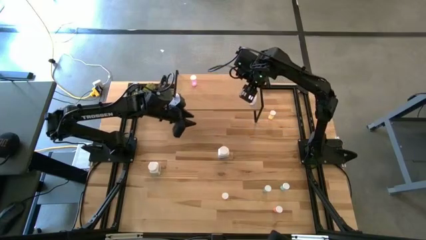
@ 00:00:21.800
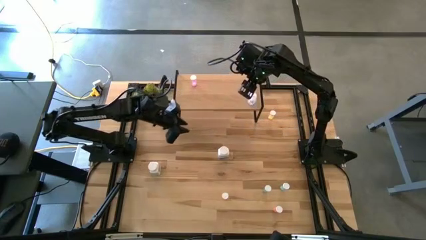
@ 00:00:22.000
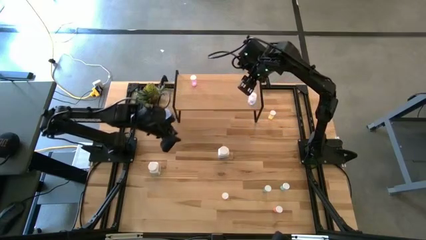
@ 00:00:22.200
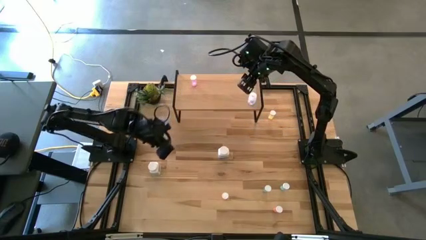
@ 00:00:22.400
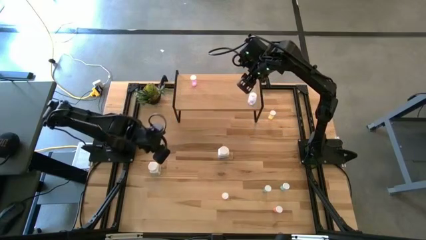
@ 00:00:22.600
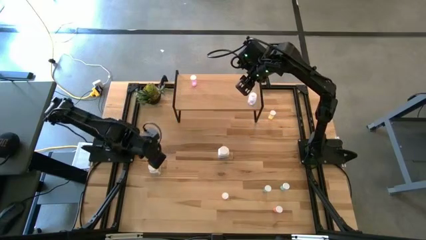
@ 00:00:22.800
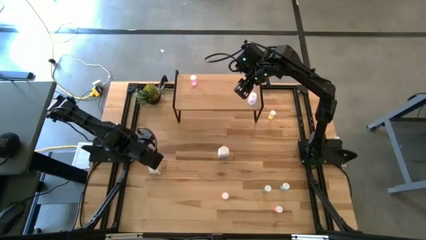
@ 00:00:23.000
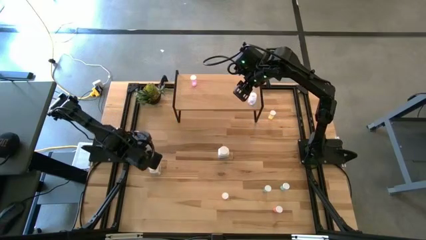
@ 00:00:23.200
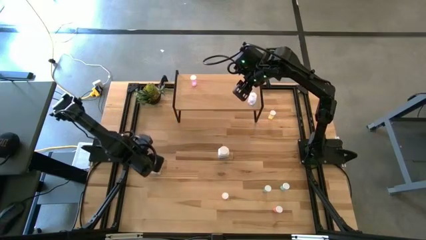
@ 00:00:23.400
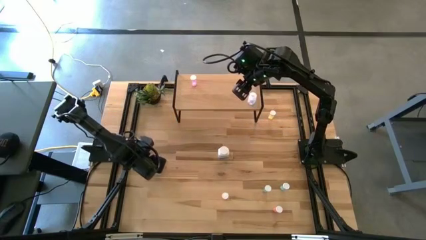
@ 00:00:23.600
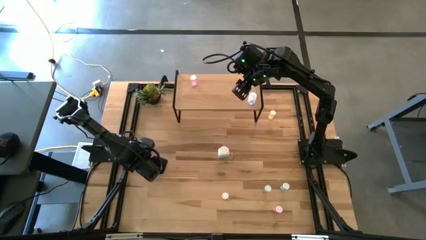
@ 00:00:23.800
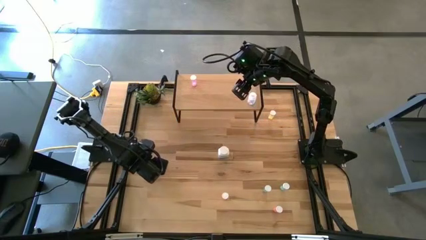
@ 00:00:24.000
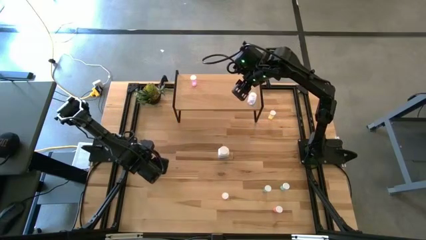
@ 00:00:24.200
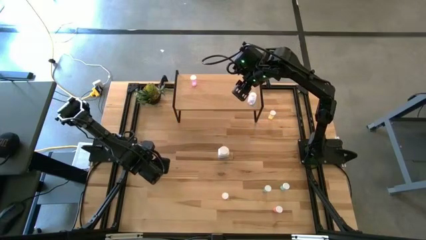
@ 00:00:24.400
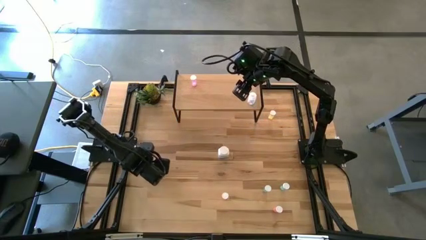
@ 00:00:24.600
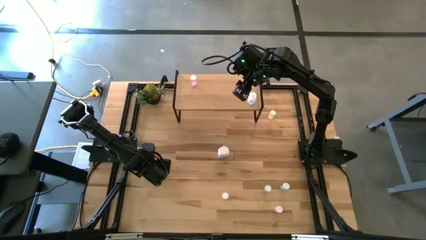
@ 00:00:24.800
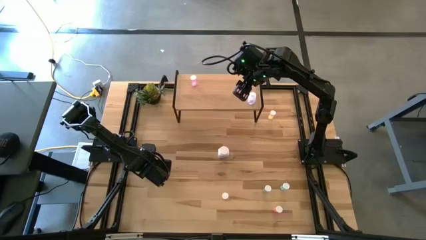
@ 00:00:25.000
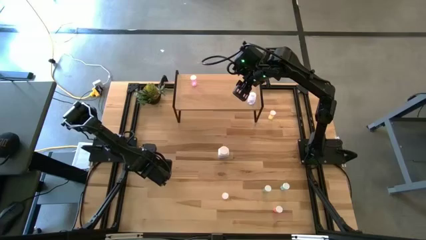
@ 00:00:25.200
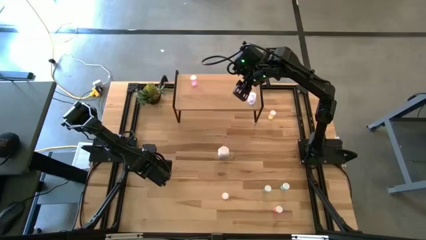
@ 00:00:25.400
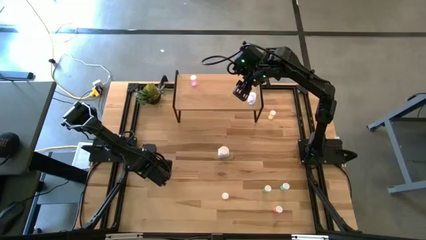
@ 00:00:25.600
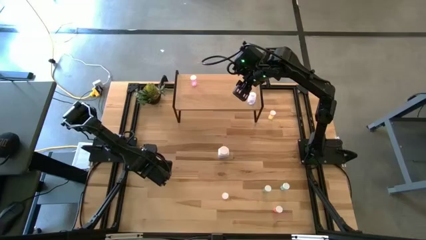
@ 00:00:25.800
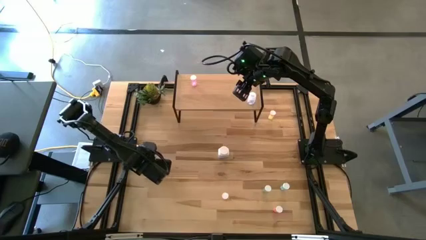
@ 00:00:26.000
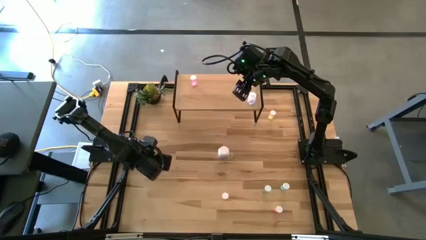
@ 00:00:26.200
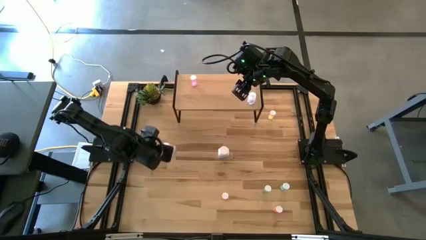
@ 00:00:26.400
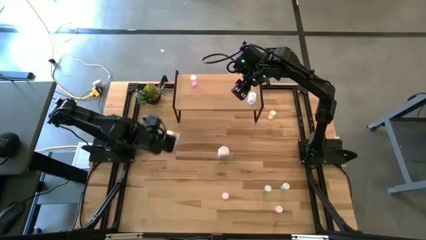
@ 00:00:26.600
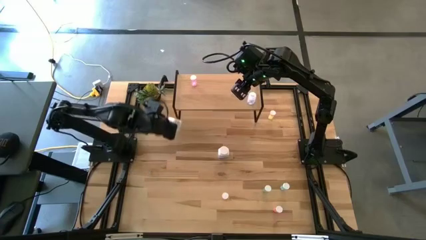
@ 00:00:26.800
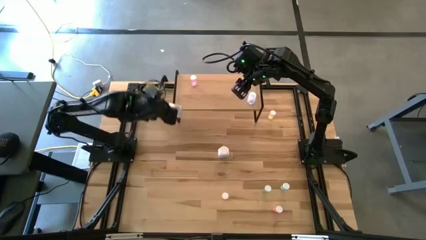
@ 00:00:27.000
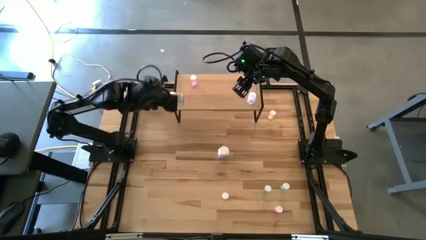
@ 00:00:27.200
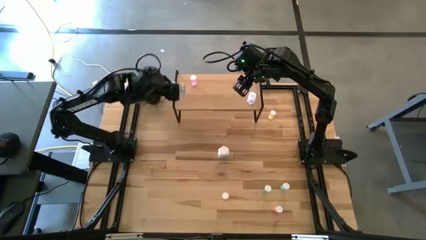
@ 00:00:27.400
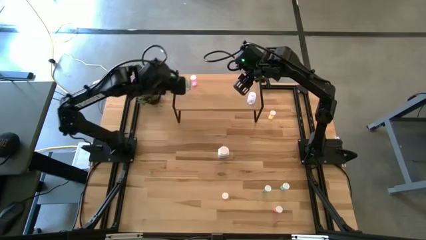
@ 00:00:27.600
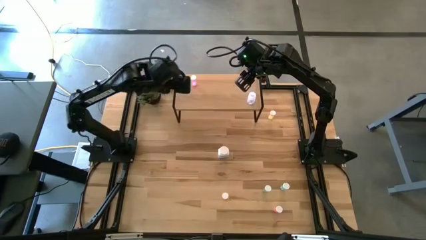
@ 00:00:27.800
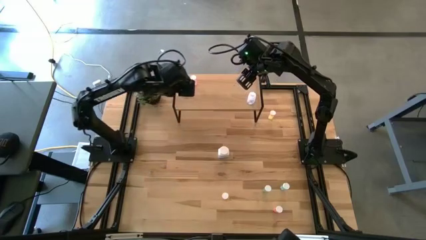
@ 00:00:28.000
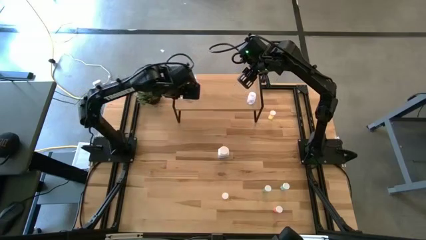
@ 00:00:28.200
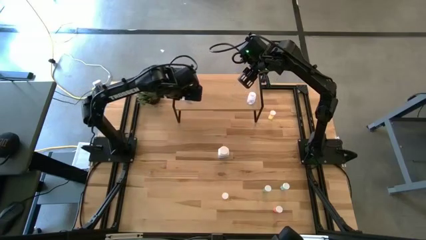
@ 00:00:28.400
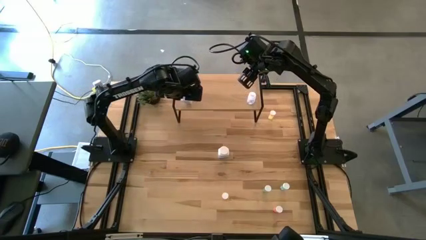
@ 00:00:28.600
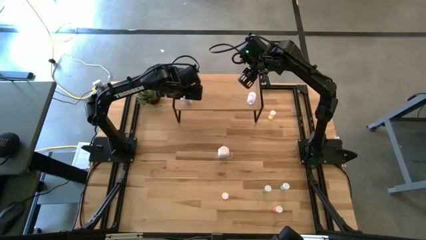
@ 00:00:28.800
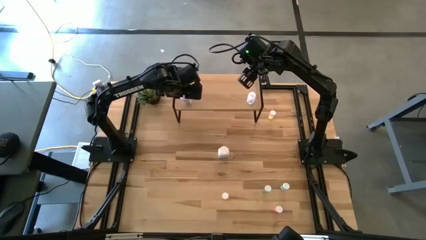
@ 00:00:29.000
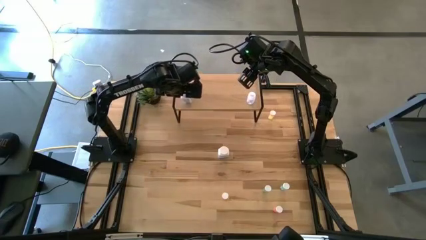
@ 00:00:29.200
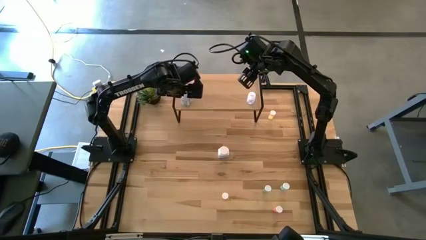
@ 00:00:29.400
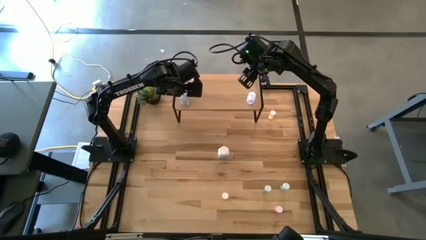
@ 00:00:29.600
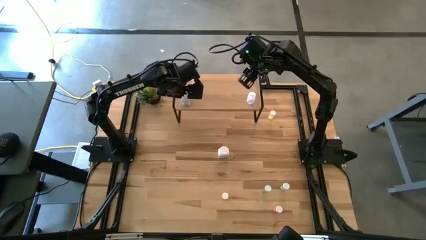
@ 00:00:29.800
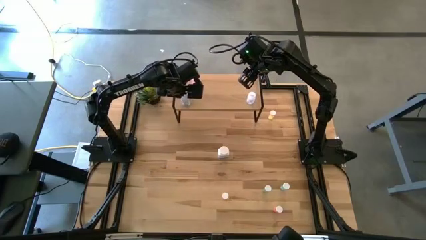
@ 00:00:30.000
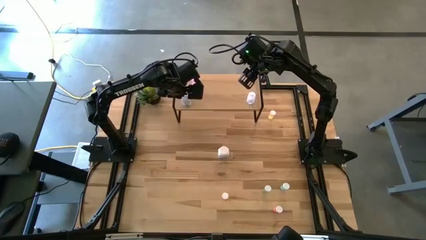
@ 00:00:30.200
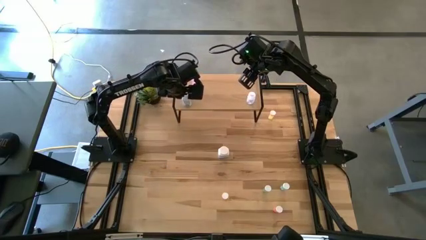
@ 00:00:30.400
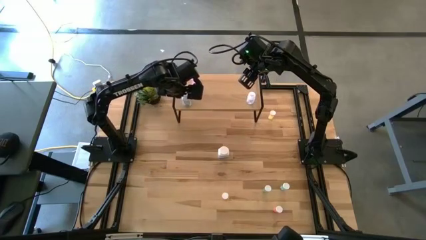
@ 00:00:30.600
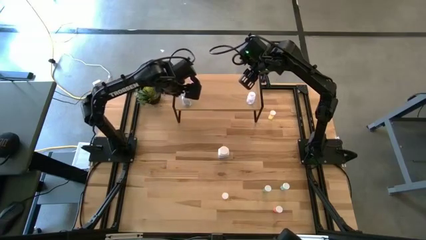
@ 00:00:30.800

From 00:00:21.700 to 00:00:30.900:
Task: Pick and place medicine bottles onto shelf by color
Put the left blue pill bottle on the shelf

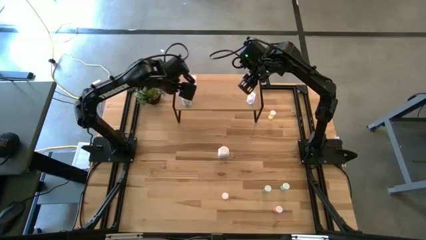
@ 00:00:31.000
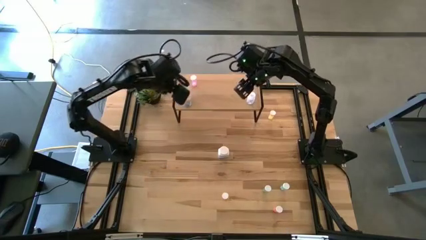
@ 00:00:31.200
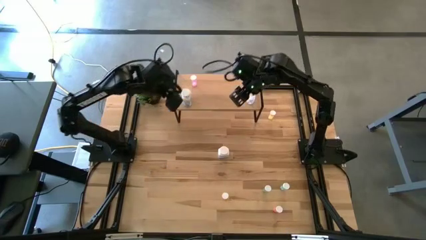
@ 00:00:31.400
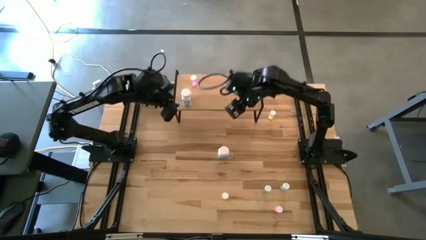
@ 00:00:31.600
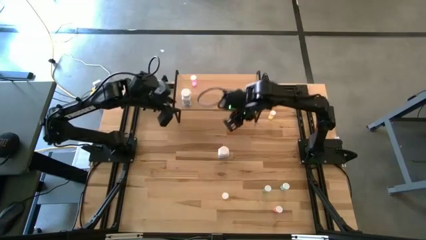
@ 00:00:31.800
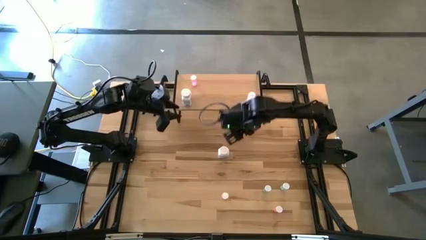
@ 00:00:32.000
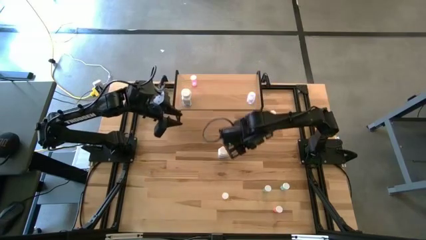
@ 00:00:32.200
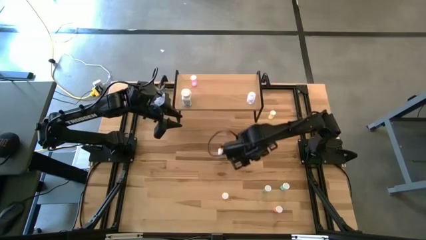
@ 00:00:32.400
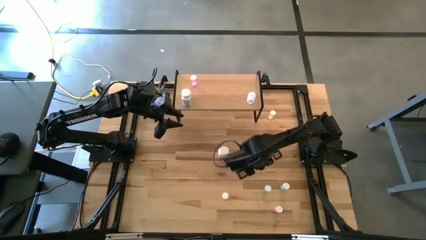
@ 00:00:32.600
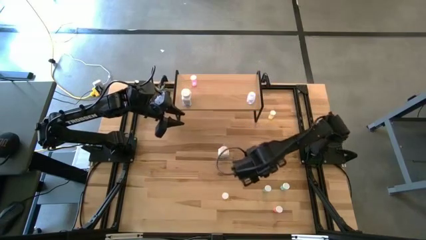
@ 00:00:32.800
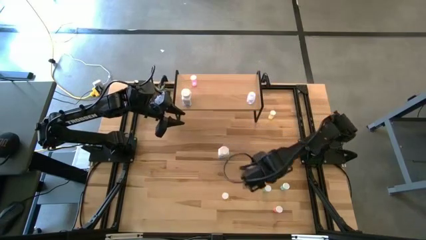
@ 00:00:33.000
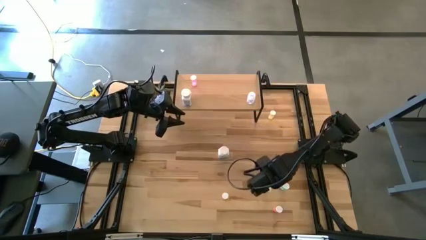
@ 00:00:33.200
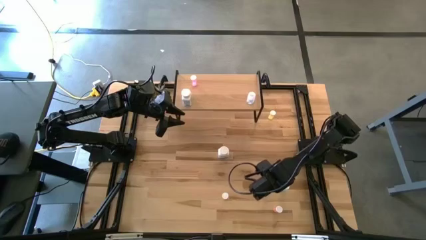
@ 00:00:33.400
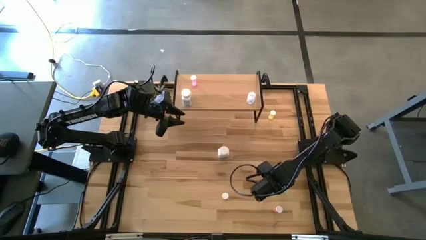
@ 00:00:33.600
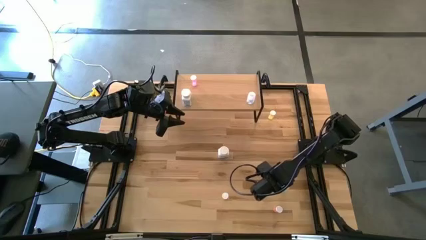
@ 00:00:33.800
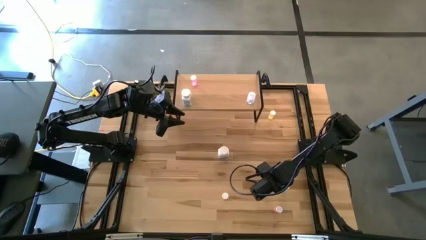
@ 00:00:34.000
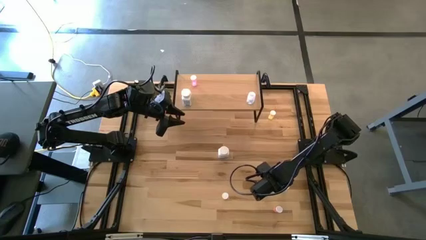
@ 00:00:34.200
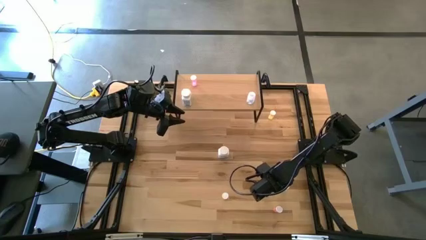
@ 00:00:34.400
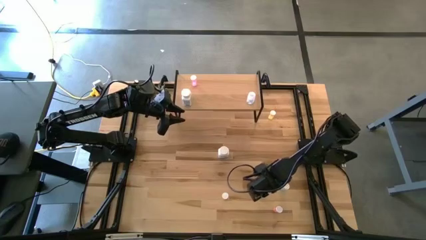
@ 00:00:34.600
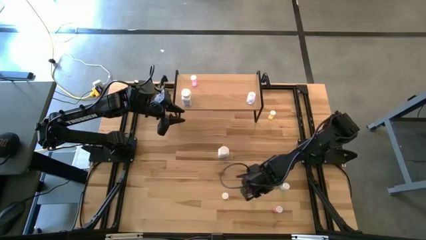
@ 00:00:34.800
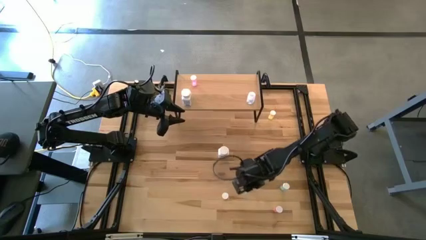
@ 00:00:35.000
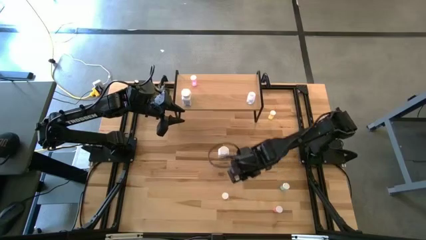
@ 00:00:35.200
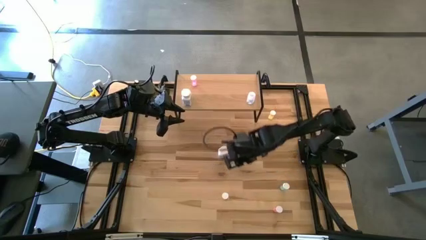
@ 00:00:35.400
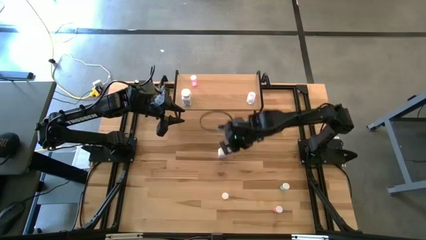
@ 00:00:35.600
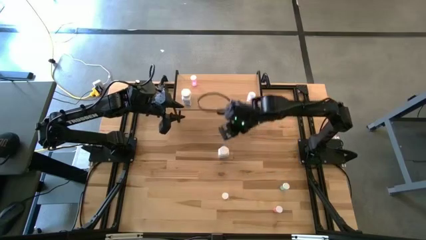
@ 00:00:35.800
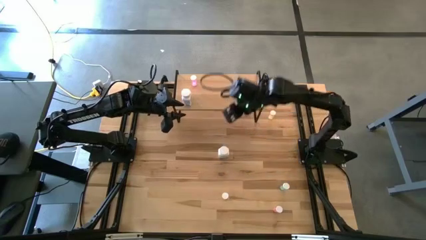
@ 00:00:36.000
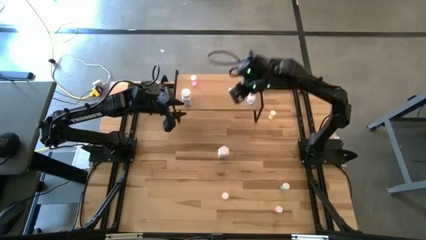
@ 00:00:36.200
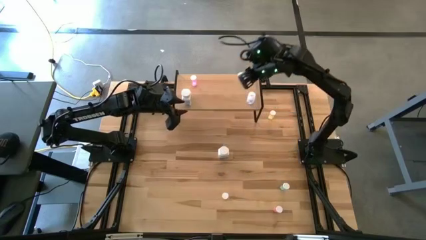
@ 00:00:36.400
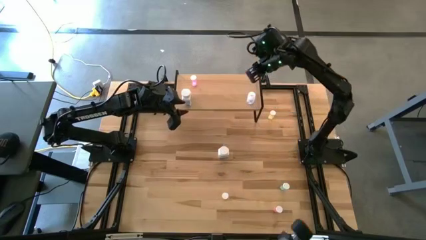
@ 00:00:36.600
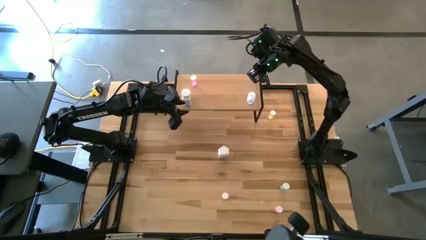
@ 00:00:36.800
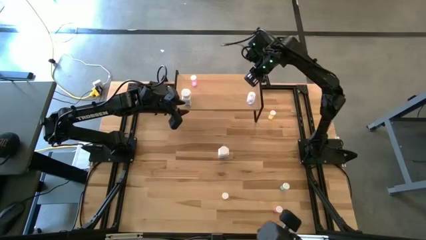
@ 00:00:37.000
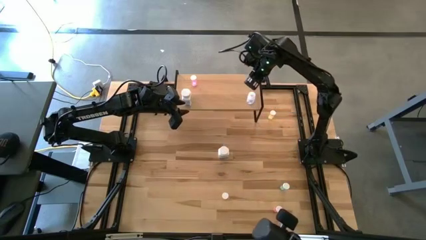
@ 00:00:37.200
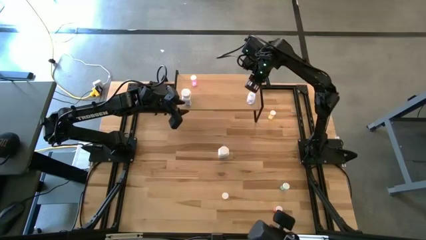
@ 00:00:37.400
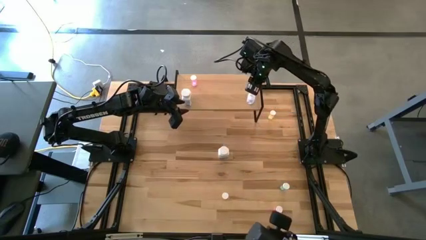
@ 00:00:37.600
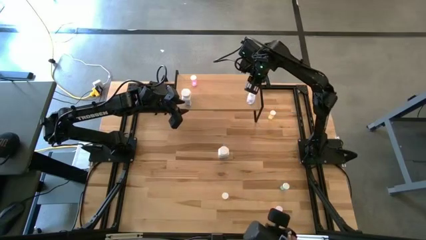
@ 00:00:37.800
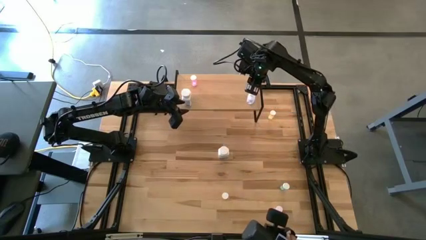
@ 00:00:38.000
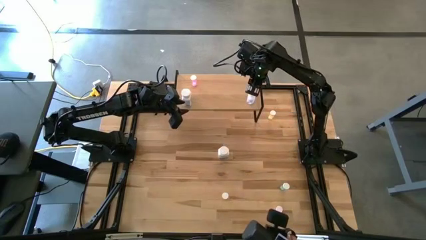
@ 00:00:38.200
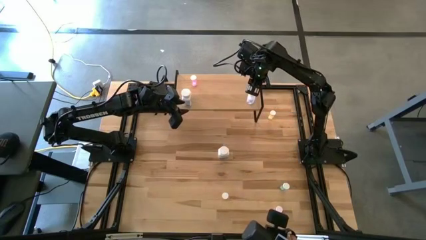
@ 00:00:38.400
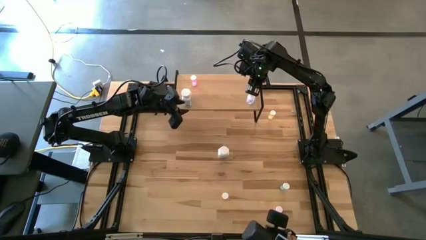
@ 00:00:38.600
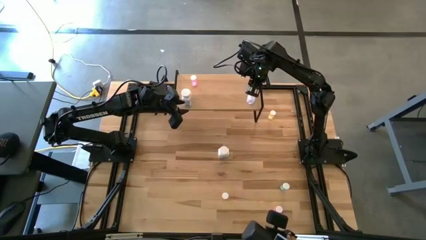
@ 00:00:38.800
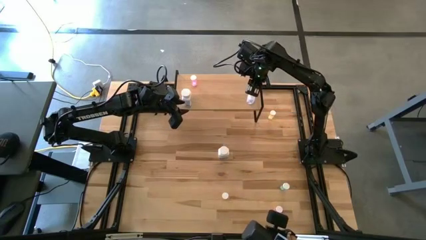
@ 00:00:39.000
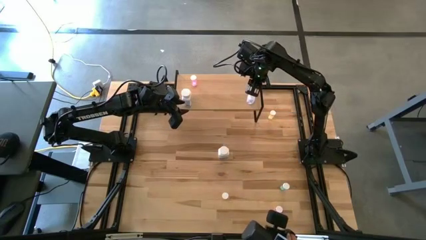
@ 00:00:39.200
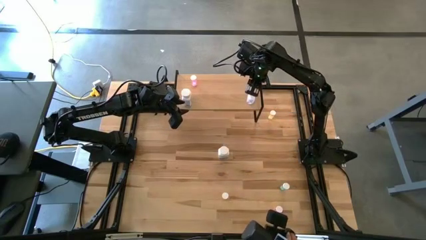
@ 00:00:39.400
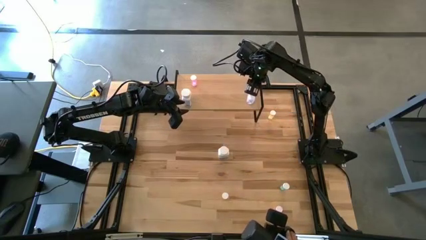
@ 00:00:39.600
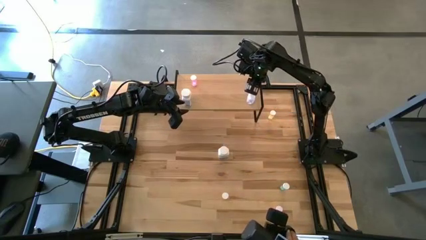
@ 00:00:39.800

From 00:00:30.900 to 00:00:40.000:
Put the left blue pill bottle on the shelf
